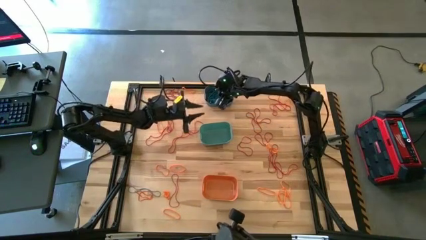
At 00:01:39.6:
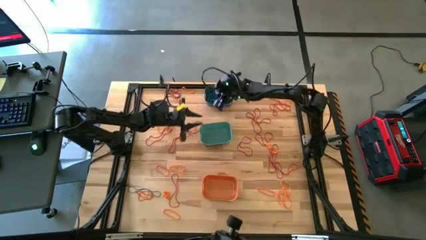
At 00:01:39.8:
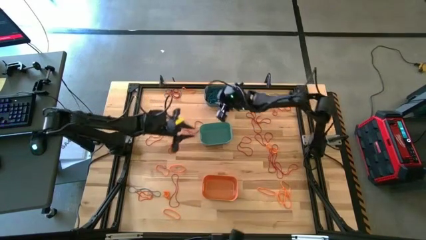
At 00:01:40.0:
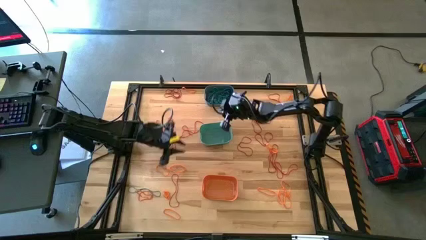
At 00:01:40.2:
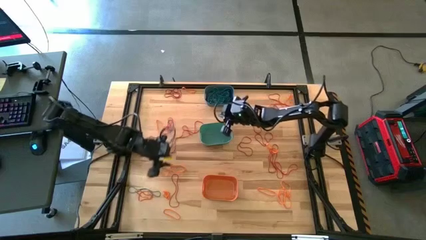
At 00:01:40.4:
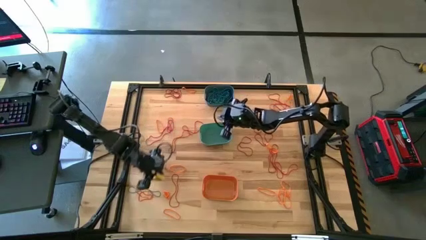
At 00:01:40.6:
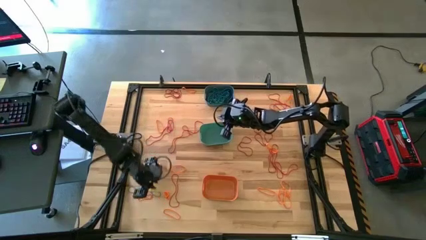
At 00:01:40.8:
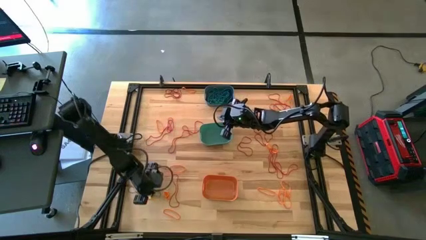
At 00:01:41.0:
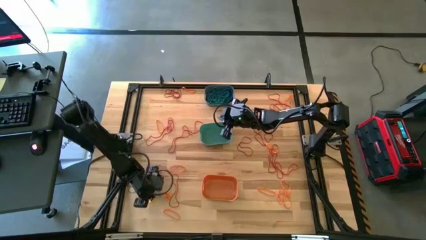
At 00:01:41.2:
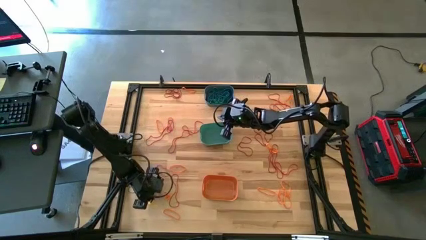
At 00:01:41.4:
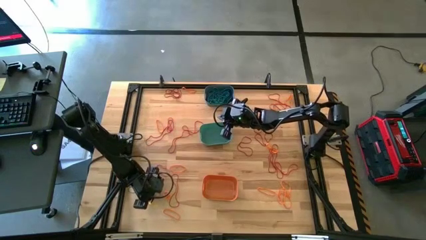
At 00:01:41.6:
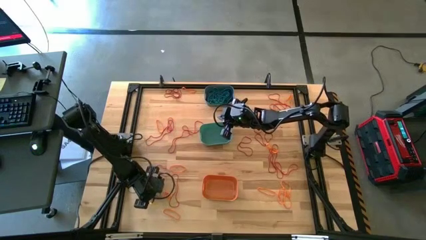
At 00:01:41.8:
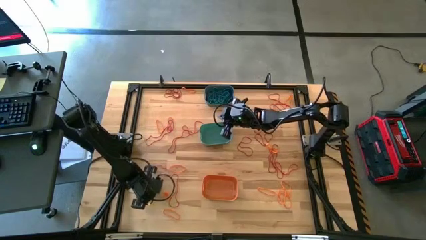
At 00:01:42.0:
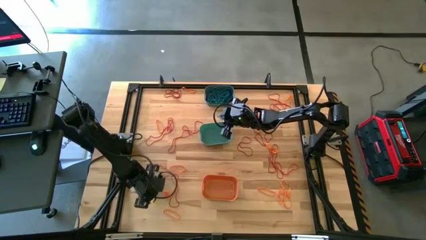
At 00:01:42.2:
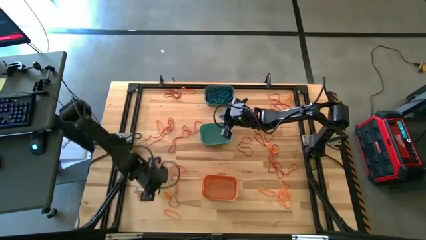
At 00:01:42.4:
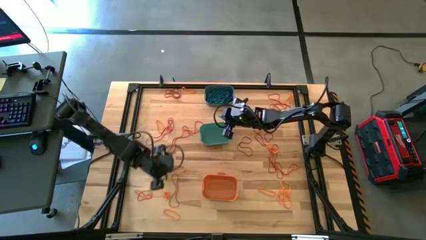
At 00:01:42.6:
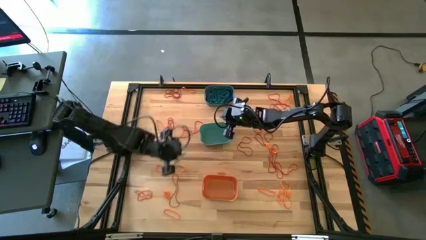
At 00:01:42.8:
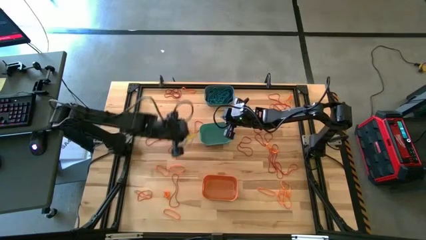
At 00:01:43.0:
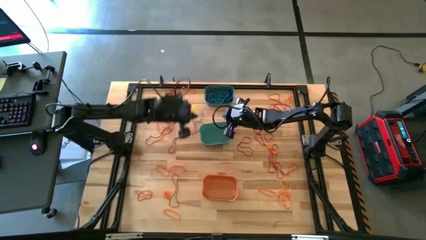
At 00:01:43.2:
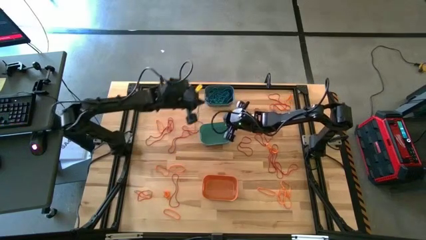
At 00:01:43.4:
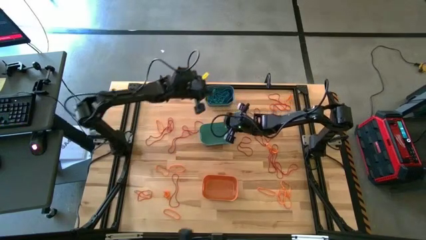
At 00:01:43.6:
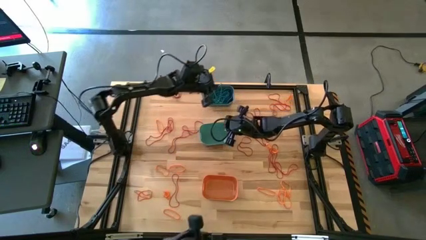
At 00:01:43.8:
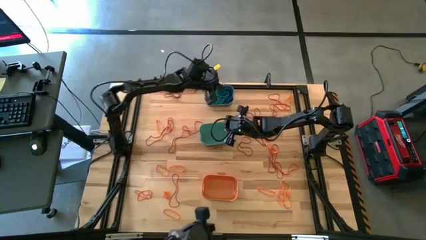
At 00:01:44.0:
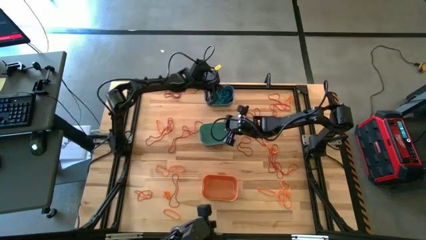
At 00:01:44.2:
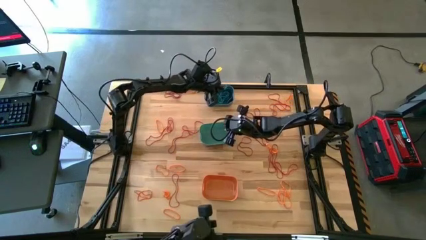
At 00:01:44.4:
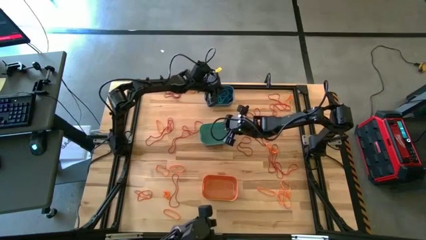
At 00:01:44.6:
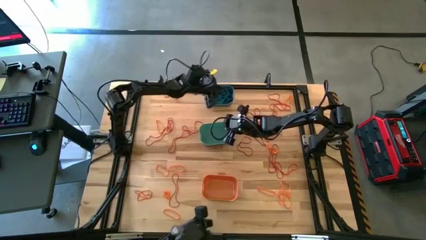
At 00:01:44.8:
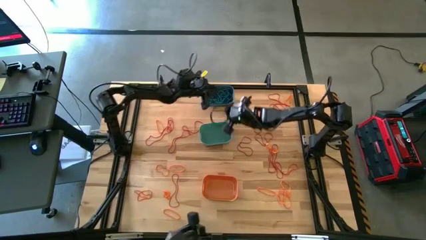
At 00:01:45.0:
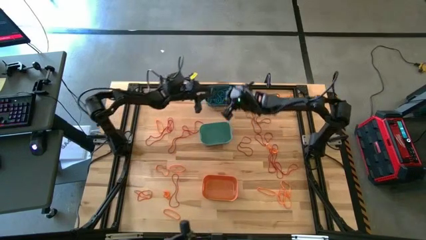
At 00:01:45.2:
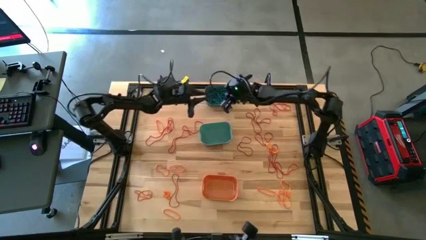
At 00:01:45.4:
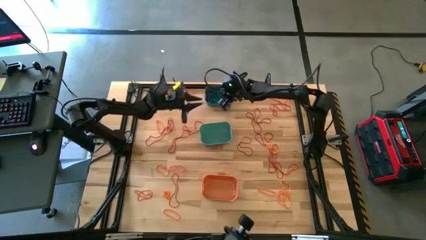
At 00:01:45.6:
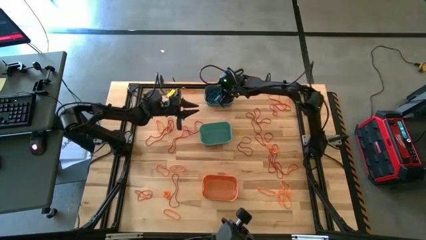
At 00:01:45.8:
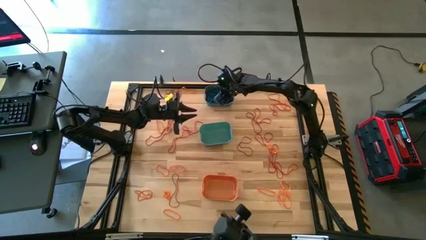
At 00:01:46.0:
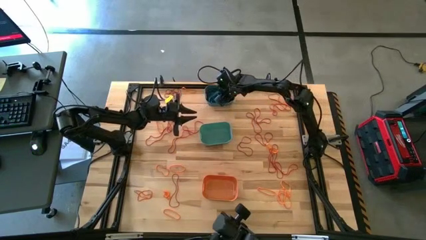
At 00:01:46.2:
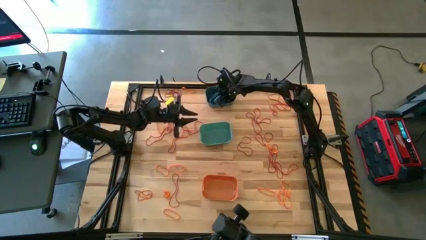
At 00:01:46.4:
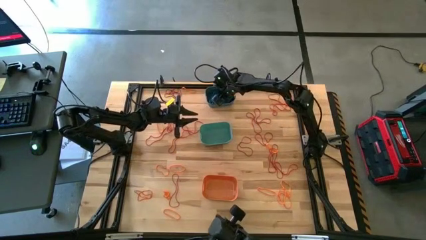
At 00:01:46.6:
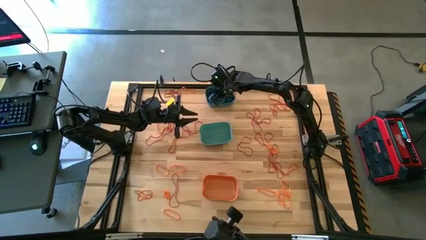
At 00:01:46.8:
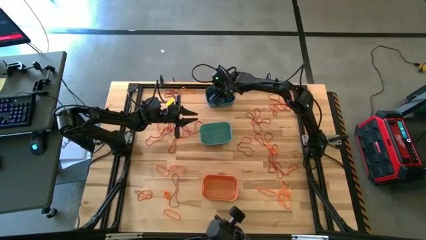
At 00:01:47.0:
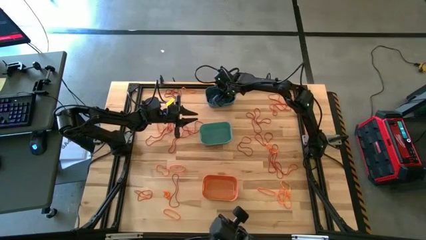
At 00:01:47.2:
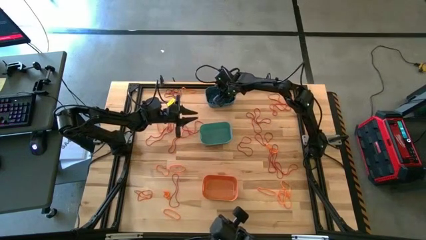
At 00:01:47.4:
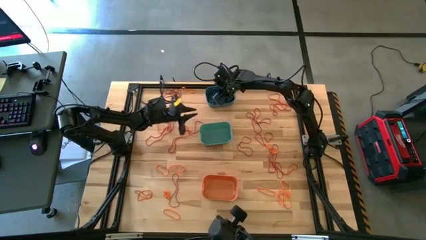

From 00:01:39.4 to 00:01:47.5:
Task: Sort rubber bands into baskets
Put the blue rubber band into the blue bin

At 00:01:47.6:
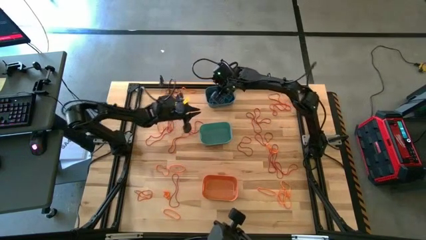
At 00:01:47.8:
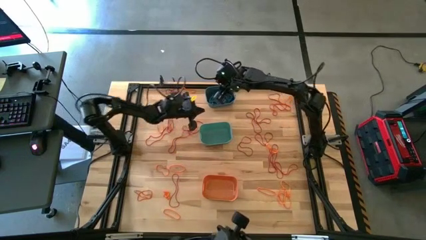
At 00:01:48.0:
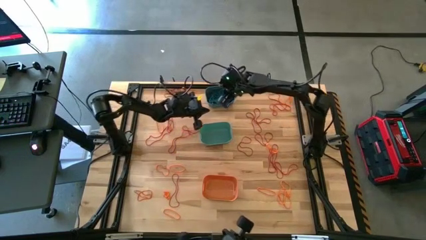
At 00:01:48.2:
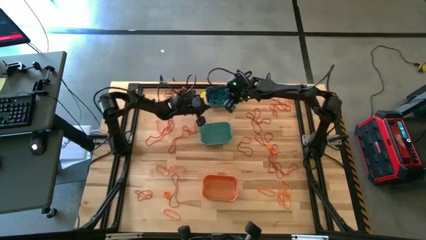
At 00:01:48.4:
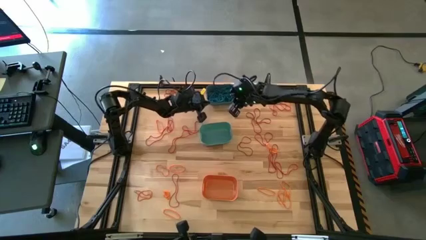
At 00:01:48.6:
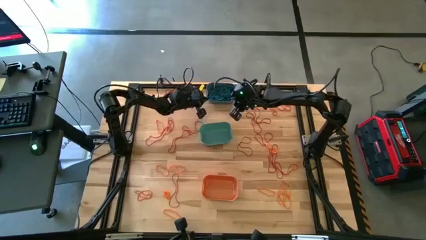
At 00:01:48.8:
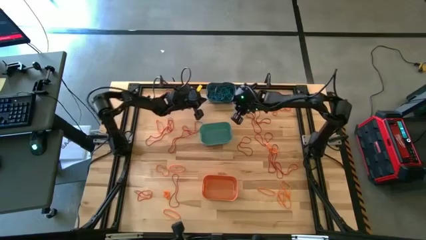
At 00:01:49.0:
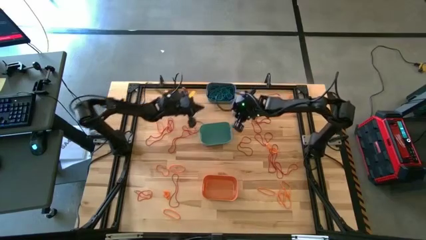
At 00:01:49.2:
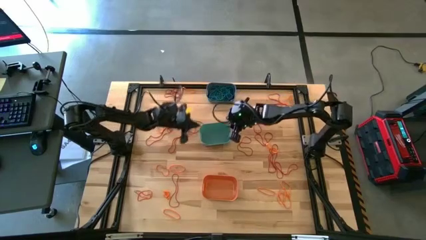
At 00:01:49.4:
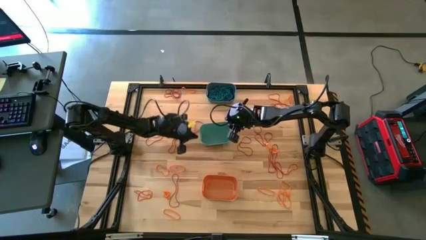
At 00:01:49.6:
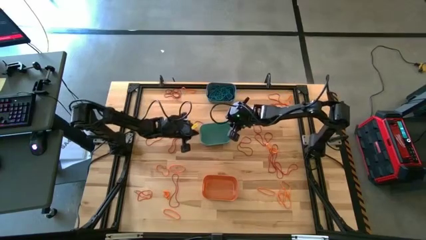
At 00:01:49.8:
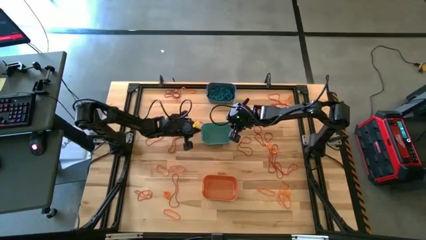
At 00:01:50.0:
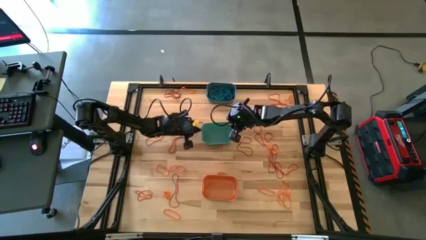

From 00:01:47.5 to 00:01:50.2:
Adjust the bins on the table

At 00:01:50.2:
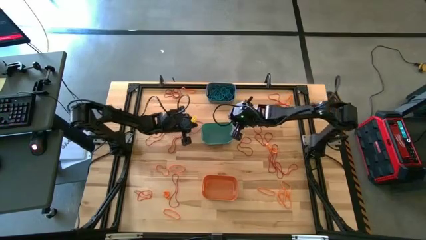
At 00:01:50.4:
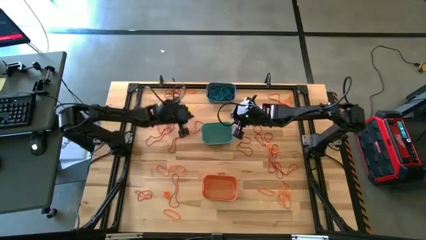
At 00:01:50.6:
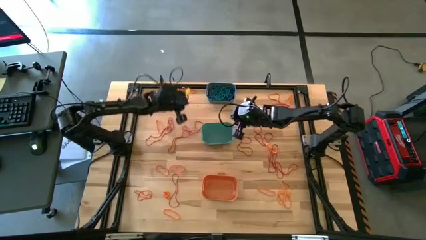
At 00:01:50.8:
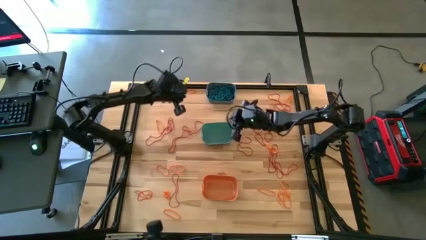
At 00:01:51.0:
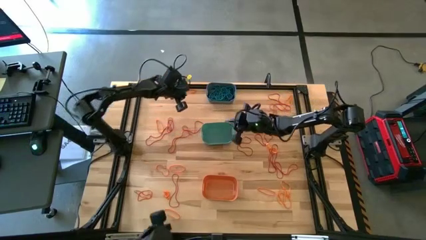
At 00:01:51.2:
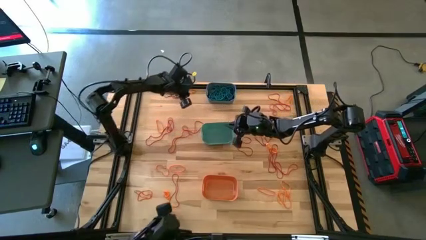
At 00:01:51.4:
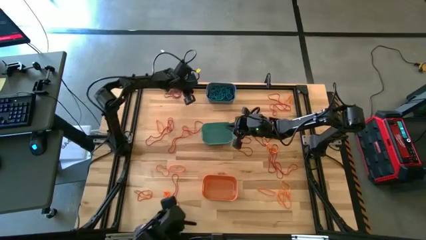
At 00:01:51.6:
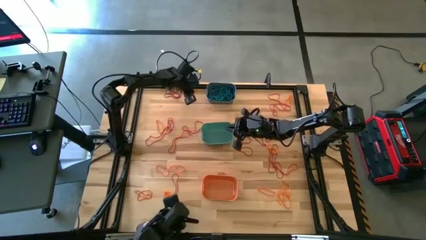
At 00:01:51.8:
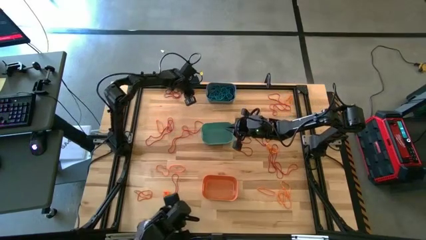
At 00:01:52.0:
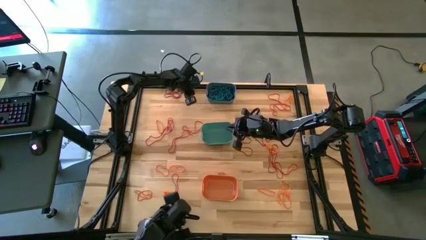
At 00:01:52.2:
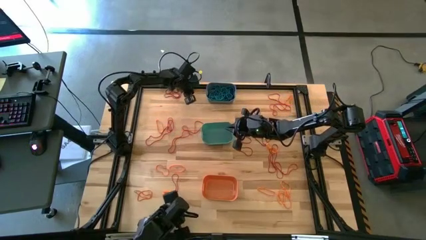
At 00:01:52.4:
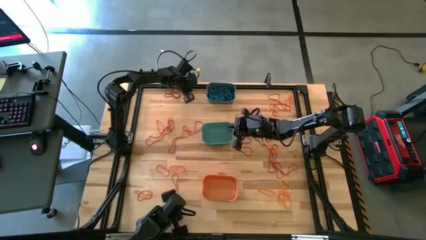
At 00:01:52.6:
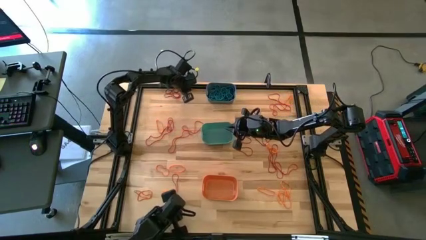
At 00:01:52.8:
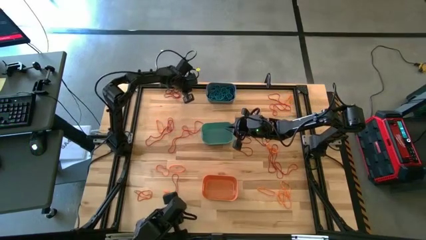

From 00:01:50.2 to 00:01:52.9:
Put the orange rubber band into the green bin

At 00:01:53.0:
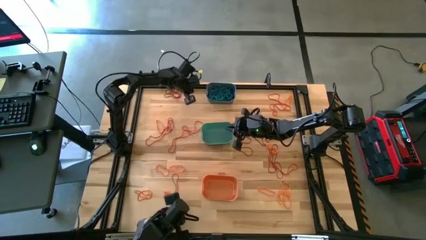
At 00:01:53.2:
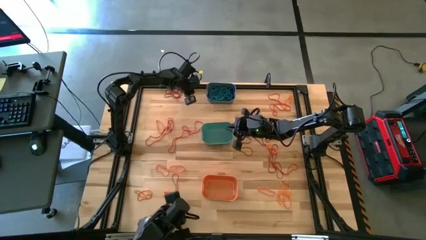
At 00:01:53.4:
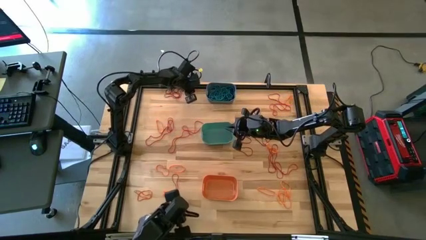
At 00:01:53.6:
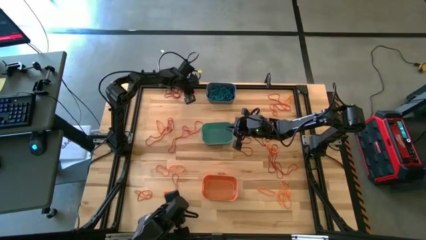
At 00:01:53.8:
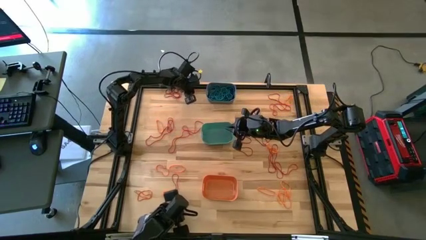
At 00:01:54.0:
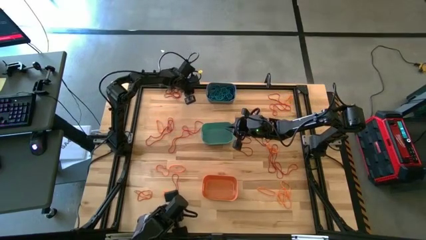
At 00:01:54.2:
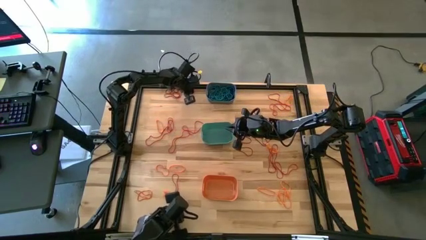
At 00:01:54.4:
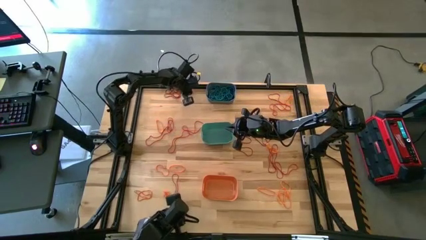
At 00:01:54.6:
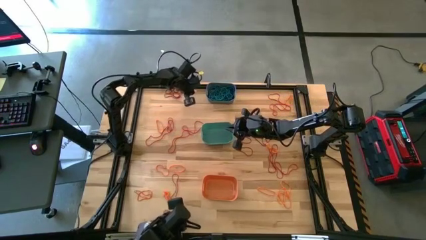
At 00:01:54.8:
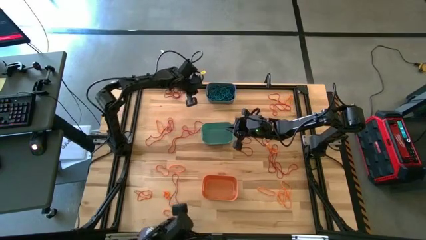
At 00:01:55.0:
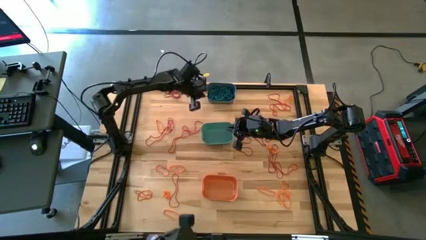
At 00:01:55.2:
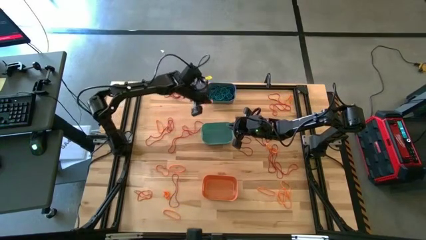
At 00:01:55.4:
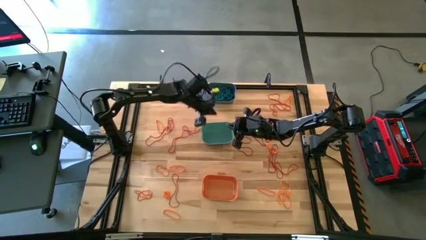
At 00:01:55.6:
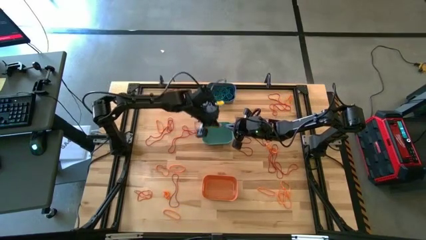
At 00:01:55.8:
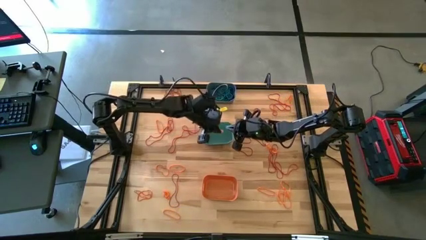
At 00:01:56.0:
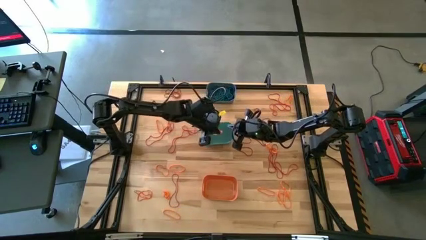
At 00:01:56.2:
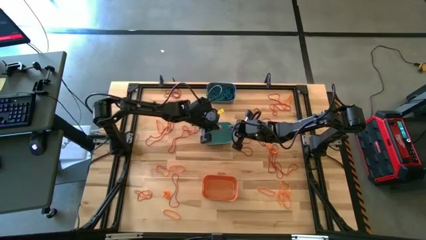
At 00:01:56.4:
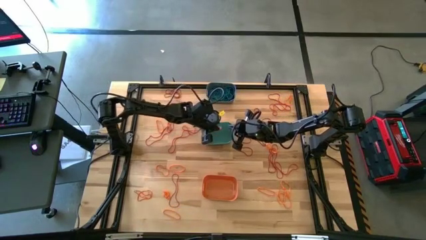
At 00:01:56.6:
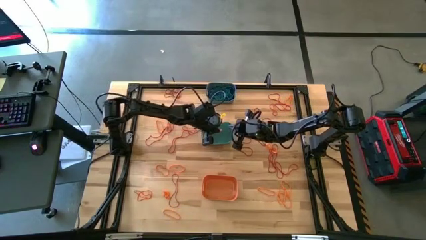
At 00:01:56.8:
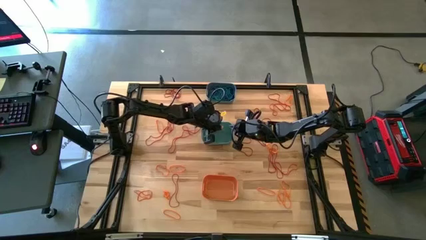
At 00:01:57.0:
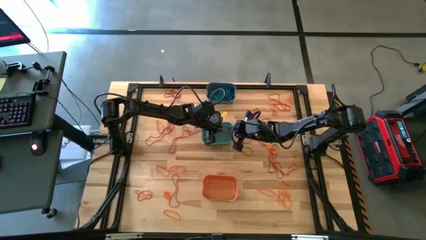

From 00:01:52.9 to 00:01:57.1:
Put the orange rubber band into the green bin
